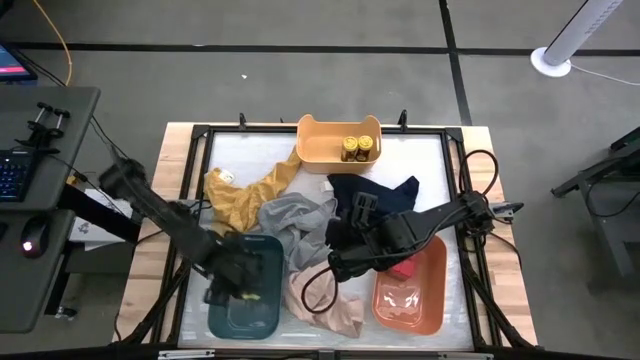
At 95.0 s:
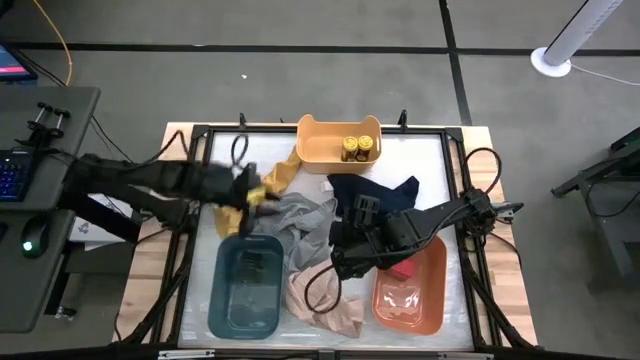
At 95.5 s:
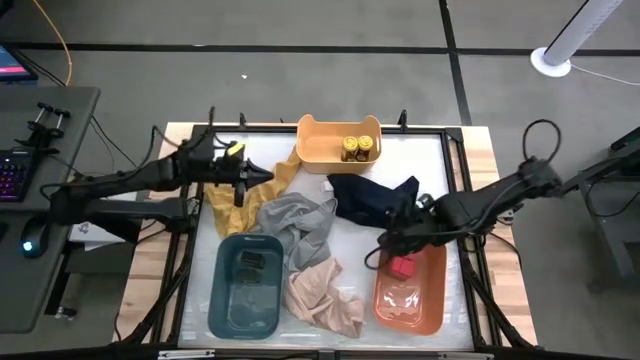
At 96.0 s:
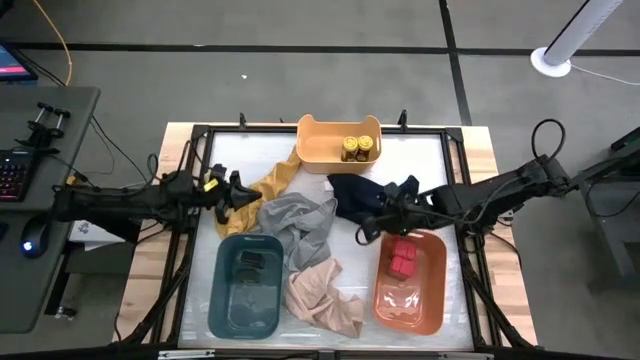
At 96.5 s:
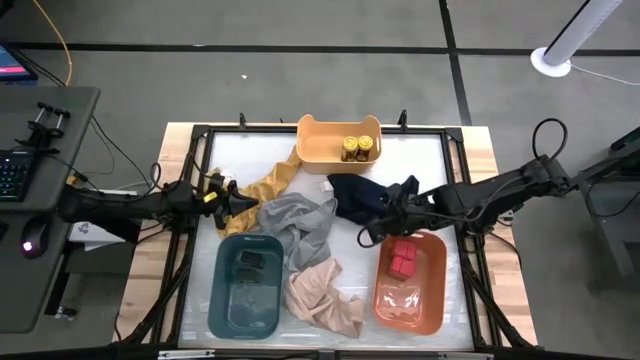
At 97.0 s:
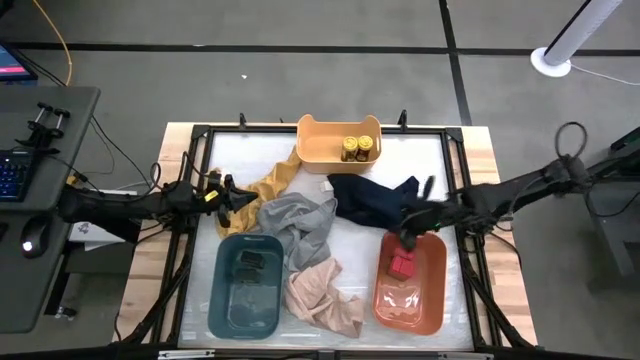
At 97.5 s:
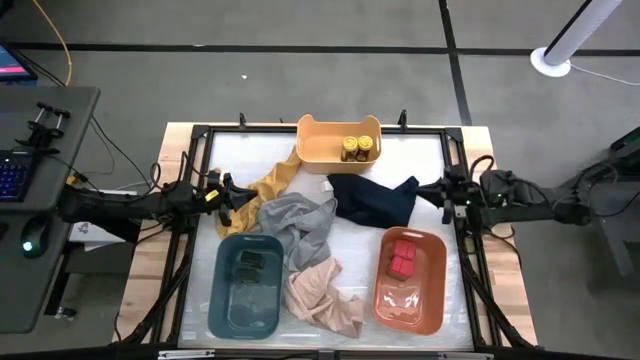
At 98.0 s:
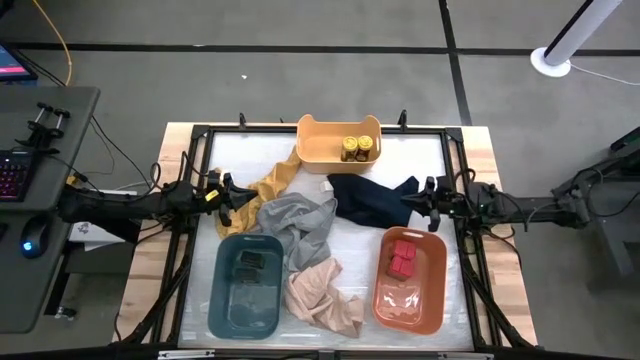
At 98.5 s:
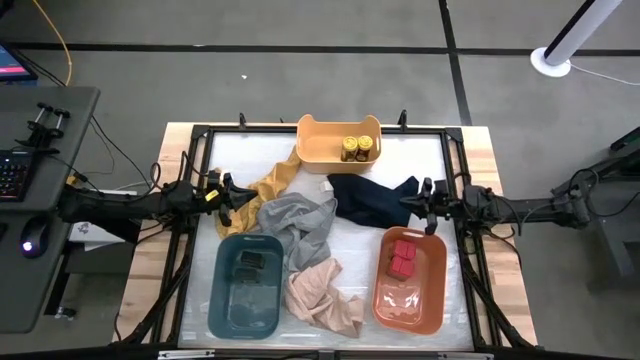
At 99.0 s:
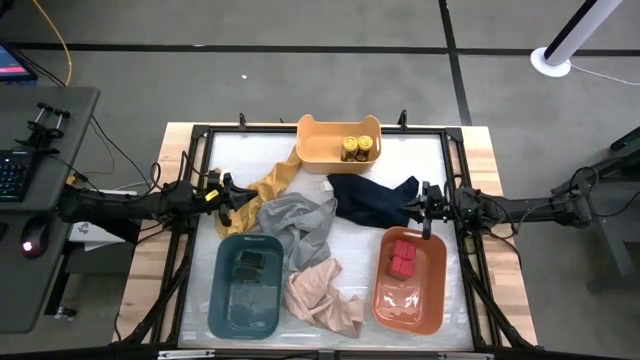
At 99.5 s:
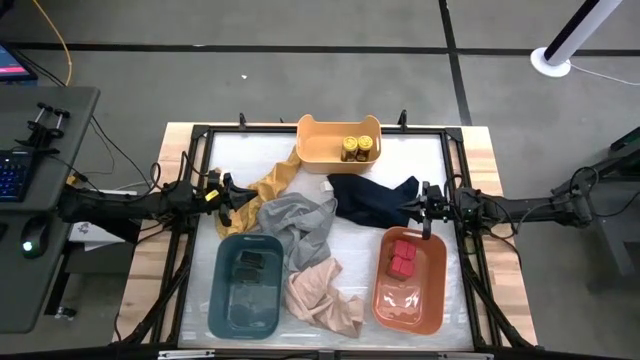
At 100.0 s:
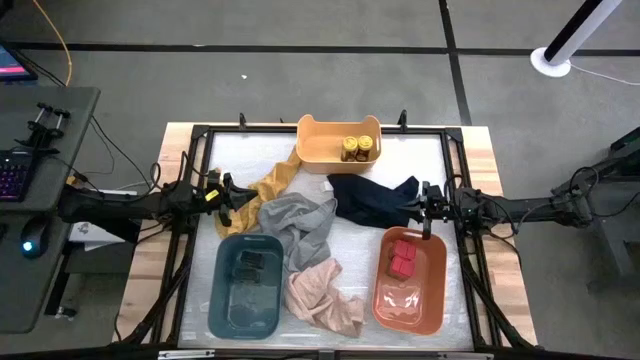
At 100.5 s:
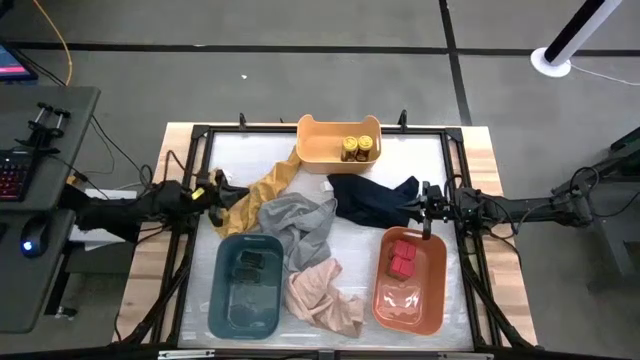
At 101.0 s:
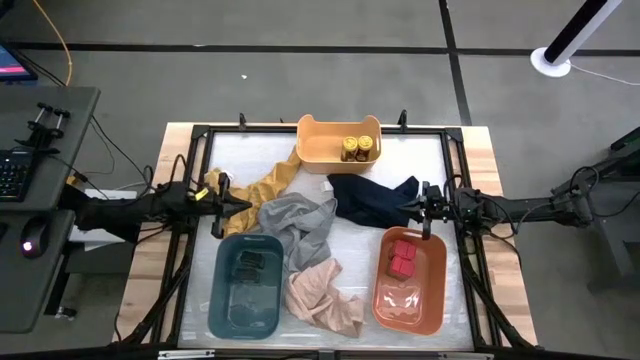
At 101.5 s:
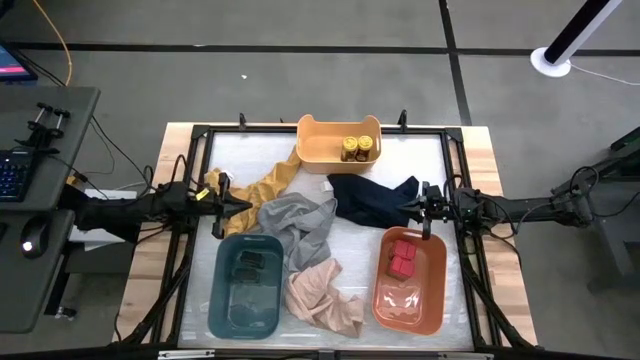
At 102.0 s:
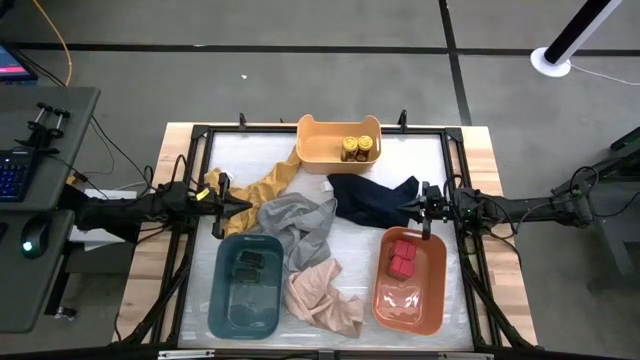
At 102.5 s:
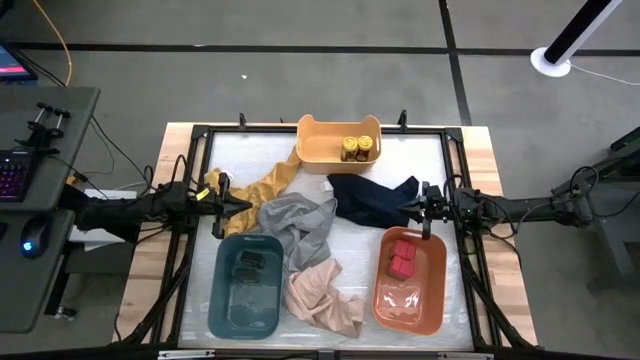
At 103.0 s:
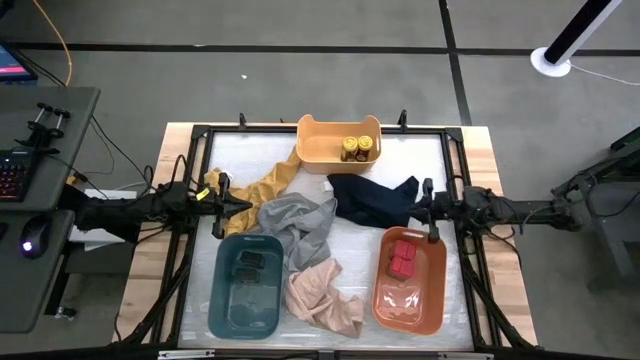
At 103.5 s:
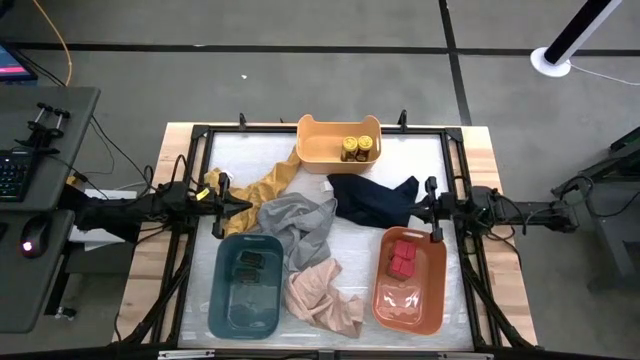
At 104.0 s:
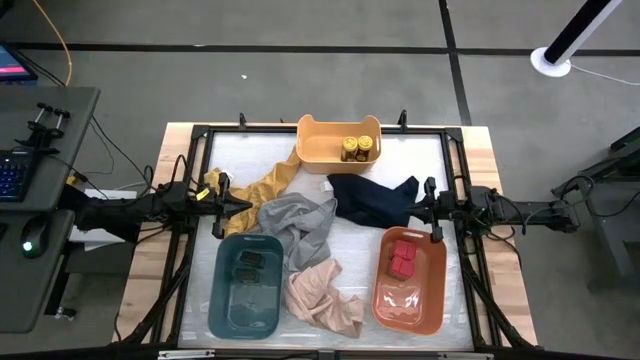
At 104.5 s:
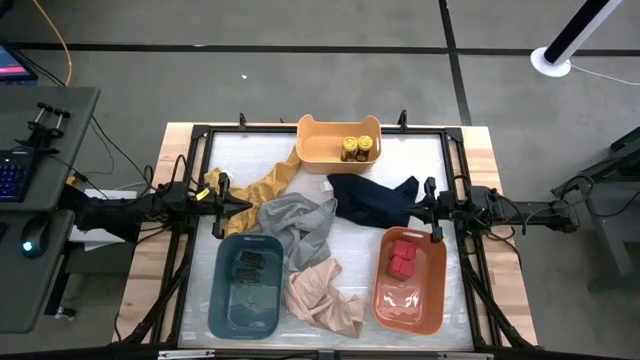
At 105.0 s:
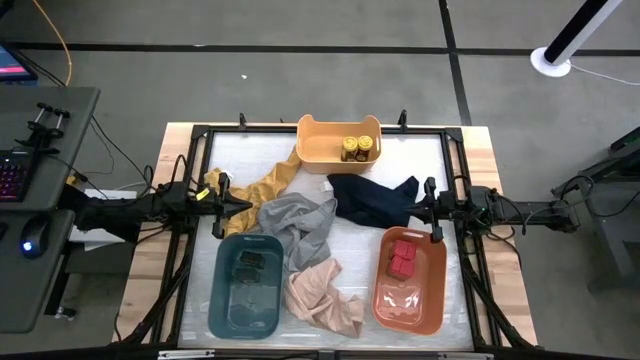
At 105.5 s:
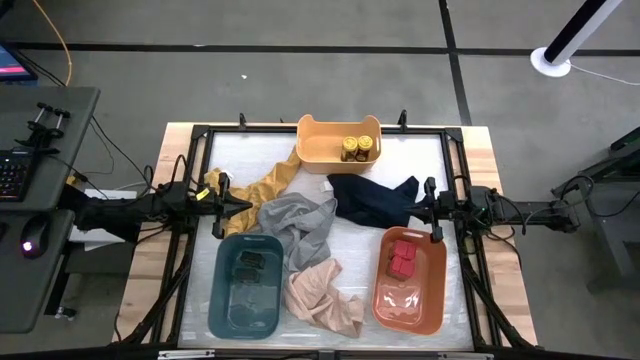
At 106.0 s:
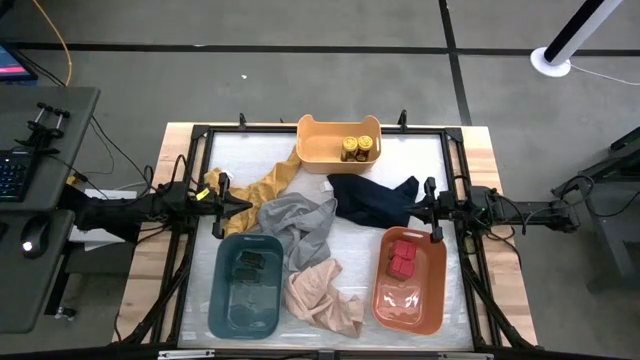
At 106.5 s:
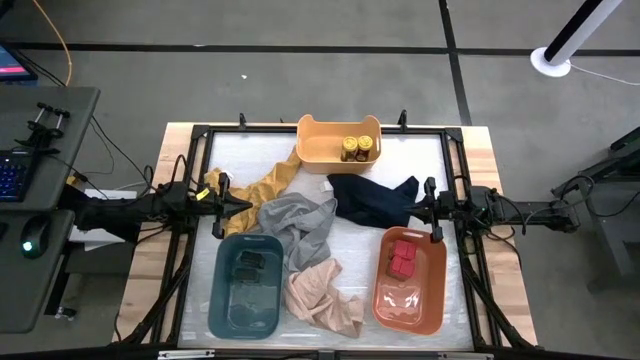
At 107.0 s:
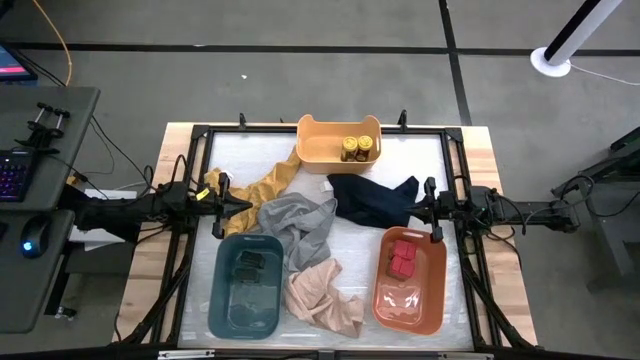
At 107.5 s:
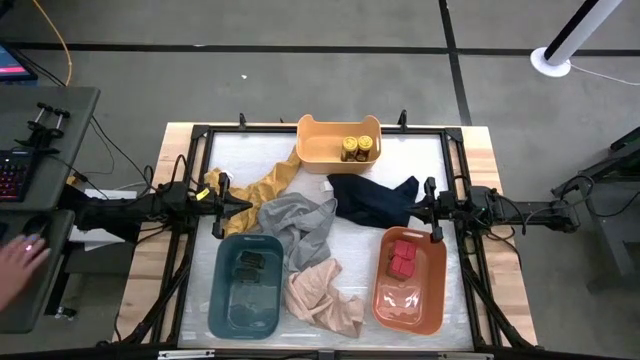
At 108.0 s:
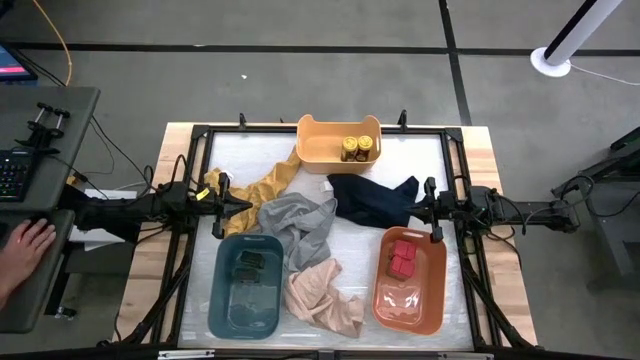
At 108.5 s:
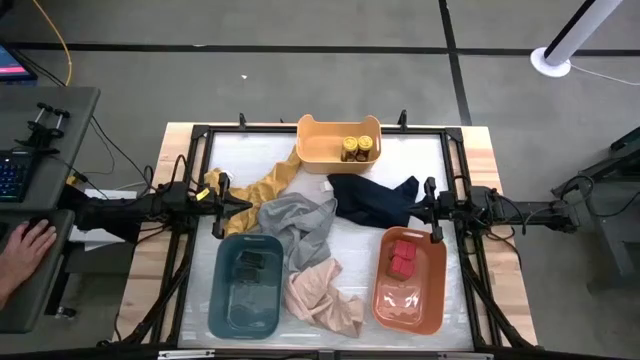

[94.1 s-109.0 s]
Task: Sort spices by type
Return to Home Position

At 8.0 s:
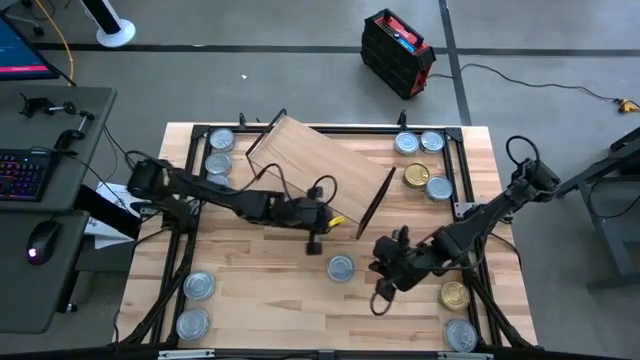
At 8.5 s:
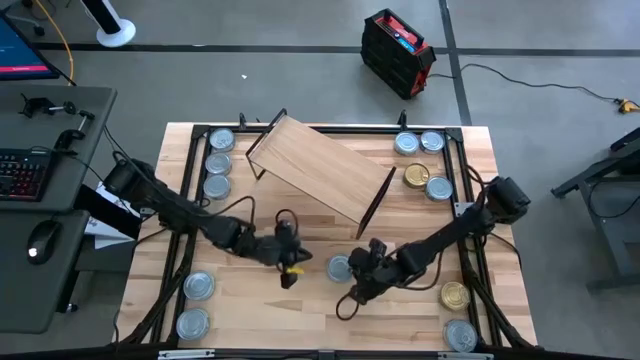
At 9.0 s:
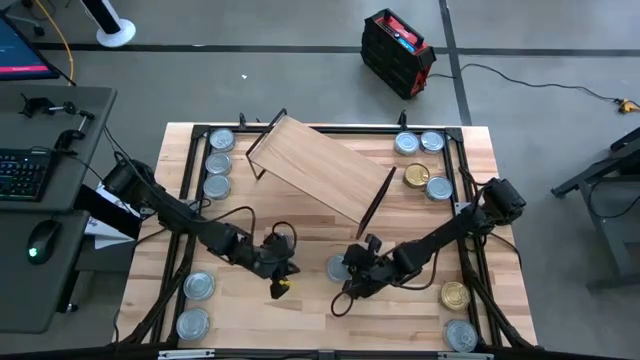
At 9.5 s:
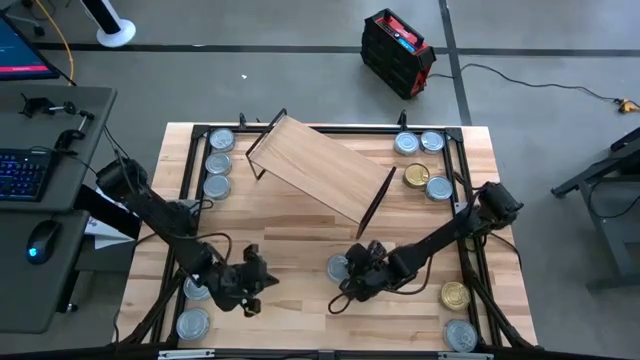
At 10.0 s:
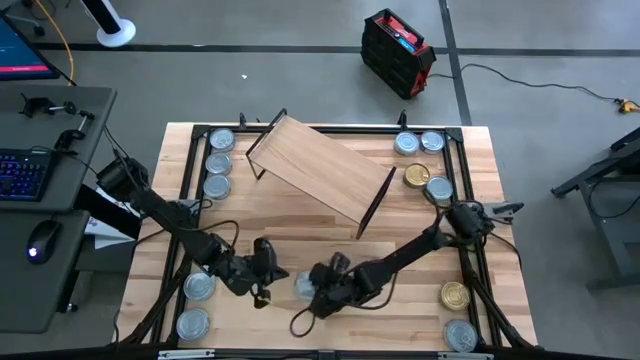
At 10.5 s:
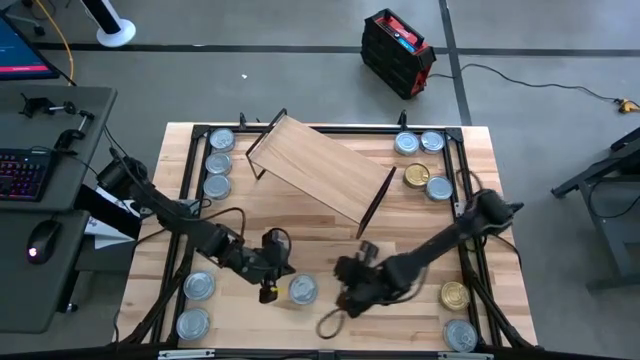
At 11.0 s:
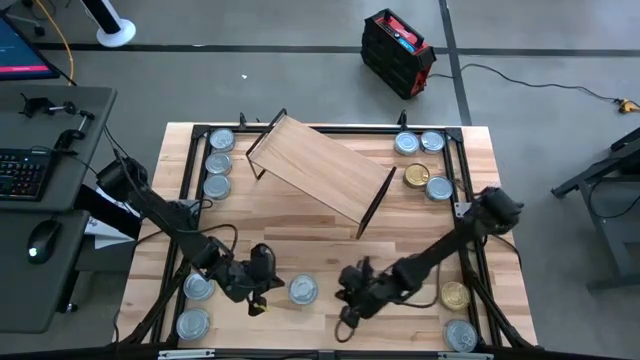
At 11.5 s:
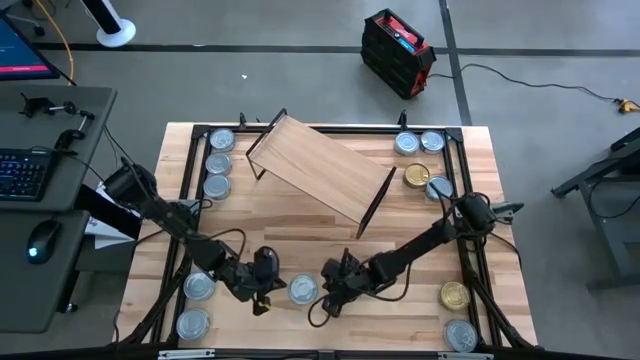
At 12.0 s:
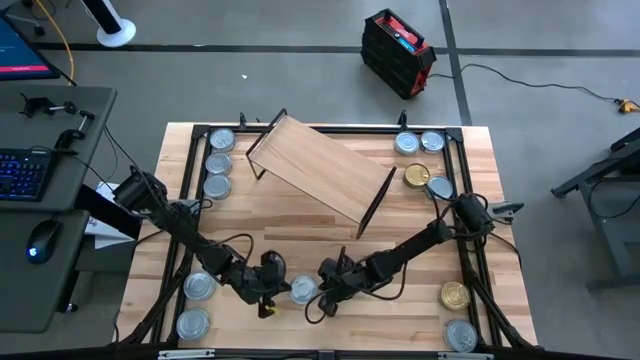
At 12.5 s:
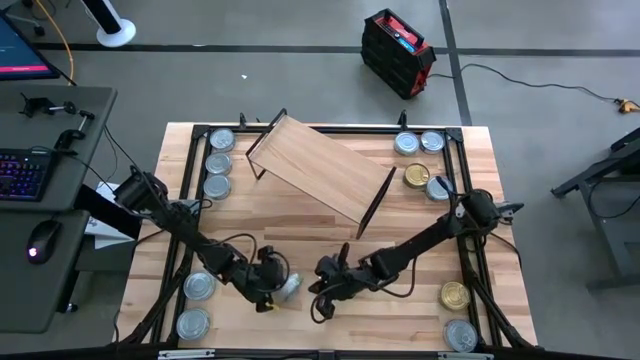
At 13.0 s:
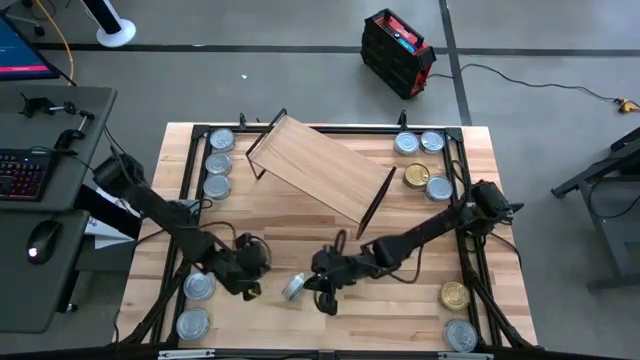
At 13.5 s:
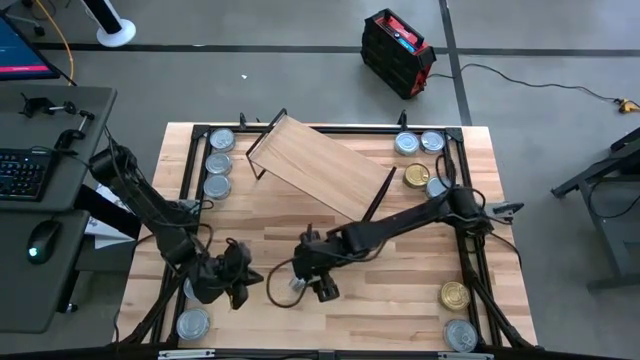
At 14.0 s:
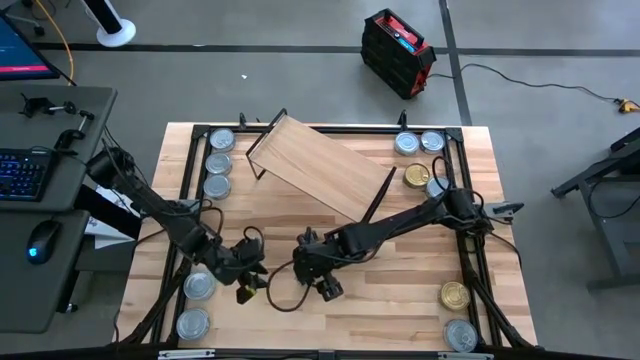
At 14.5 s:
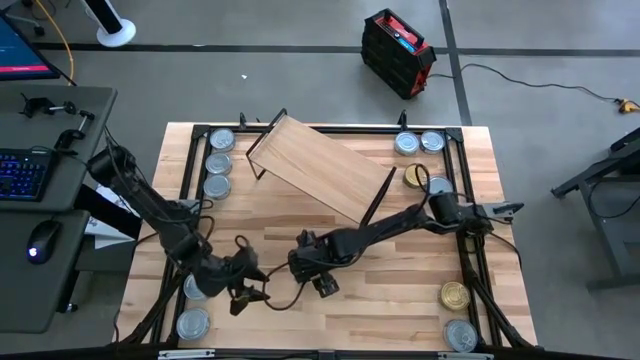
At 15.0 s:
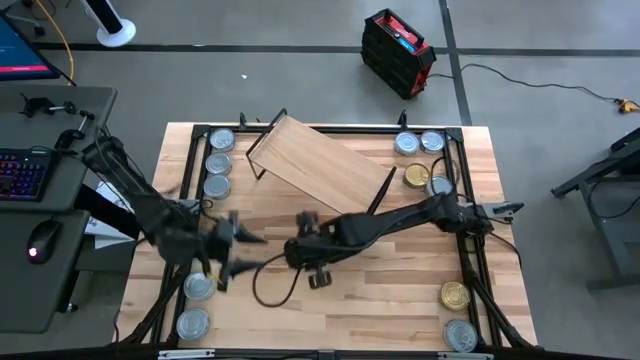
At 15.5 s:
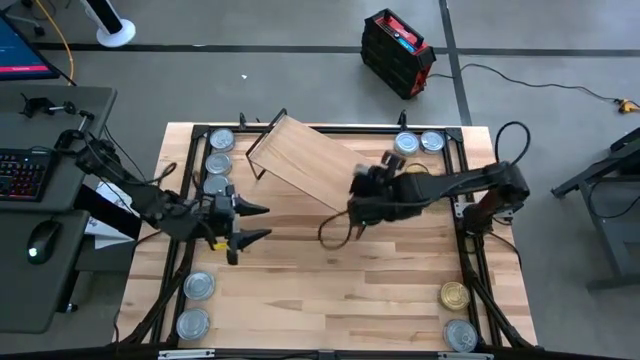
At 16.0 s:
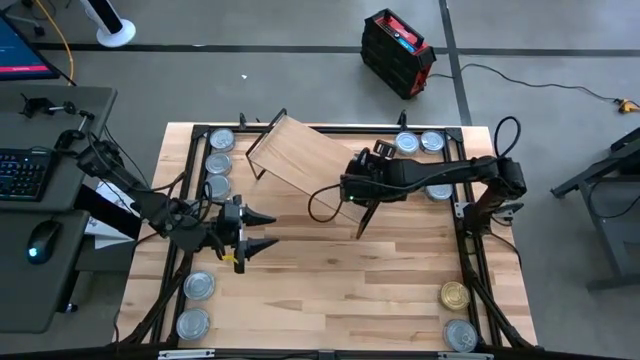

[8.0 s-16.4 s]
Task: Stack canned seafood by type on shelf
Put the white-green tuna can on the shelf
